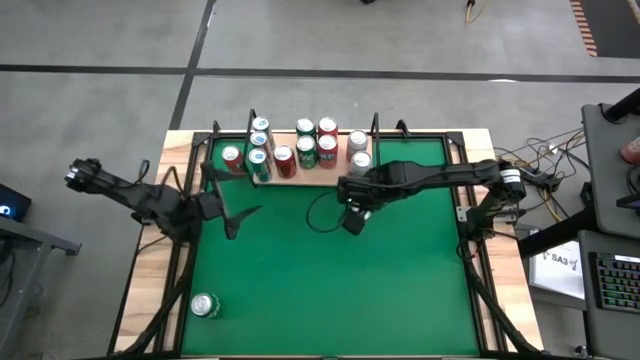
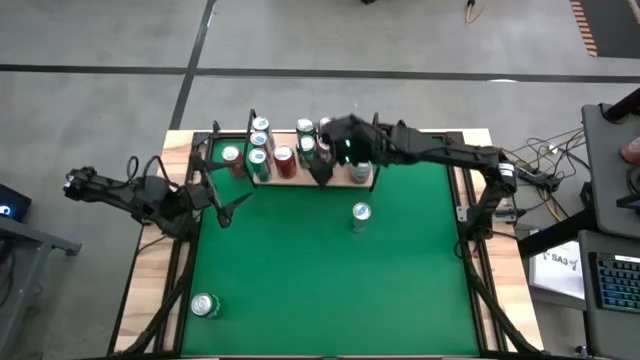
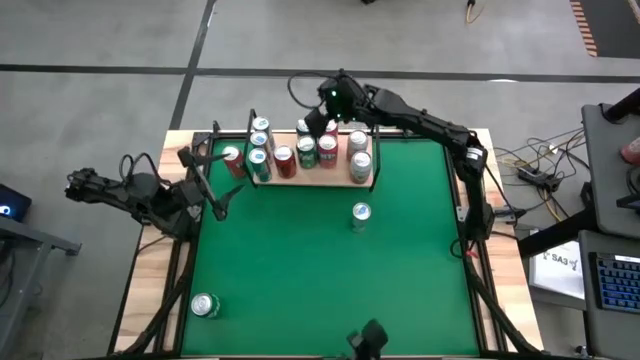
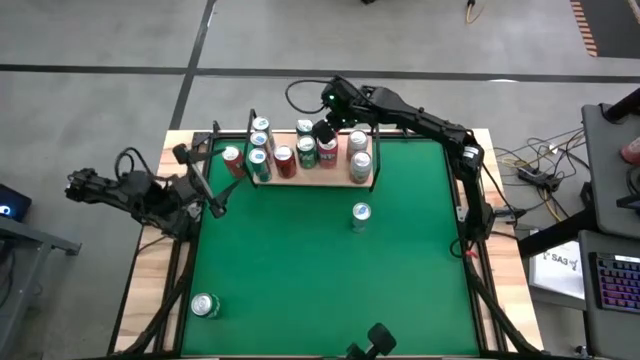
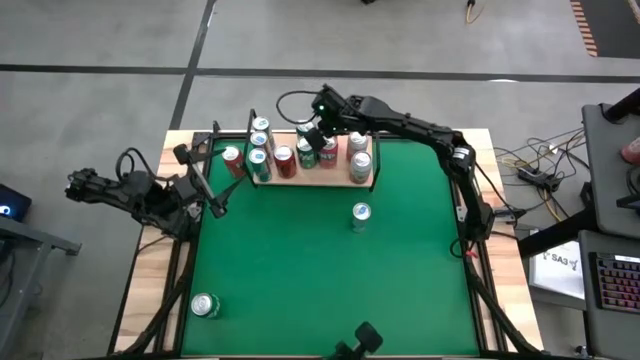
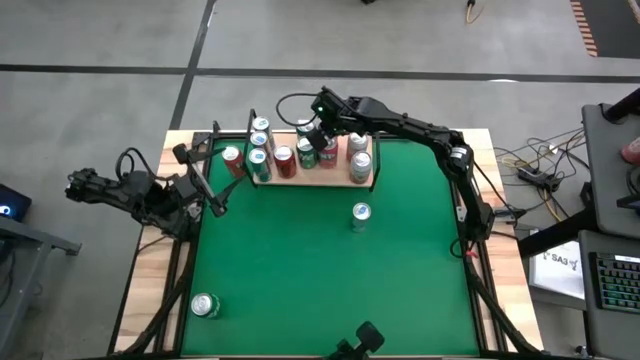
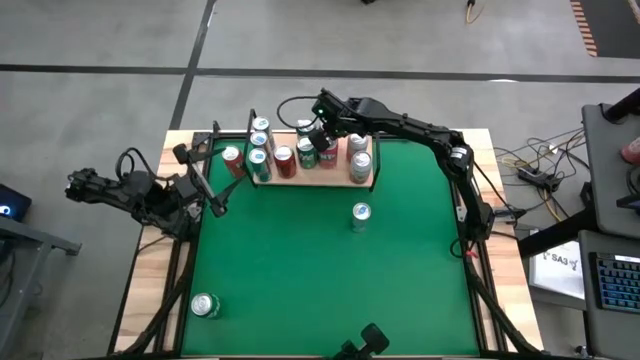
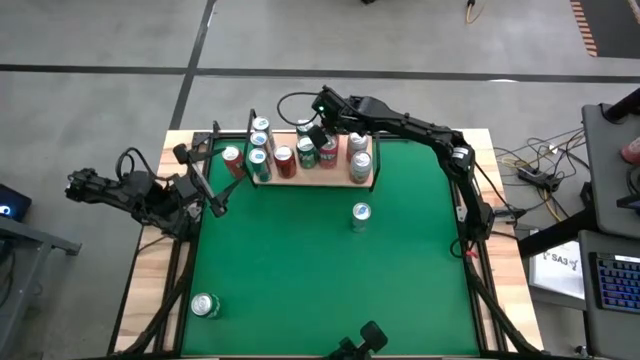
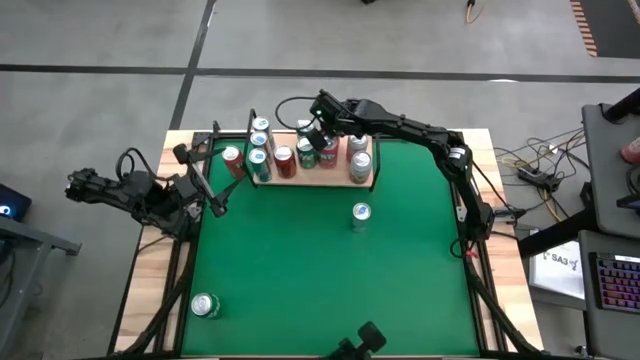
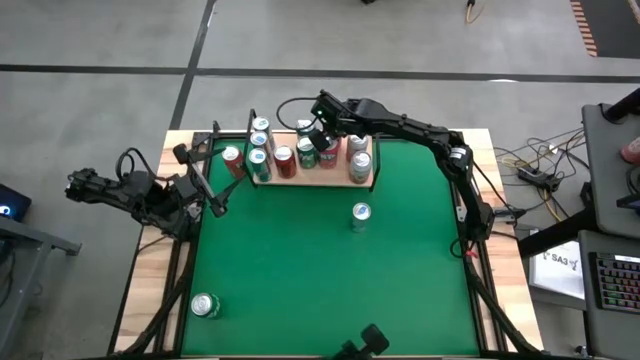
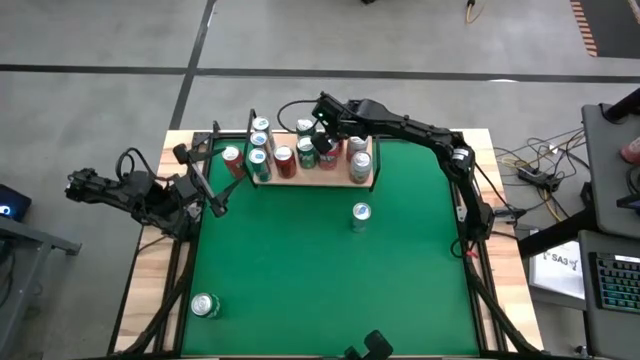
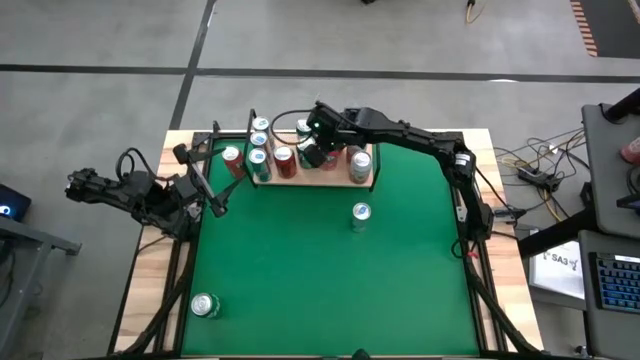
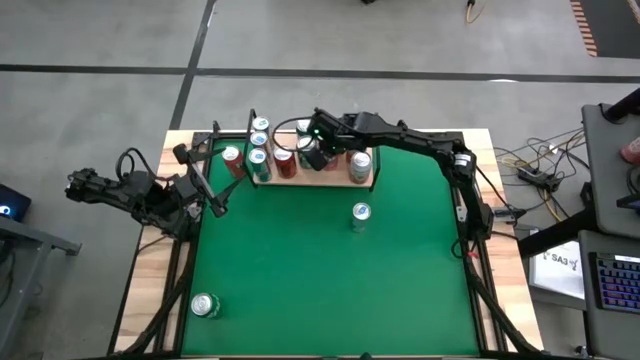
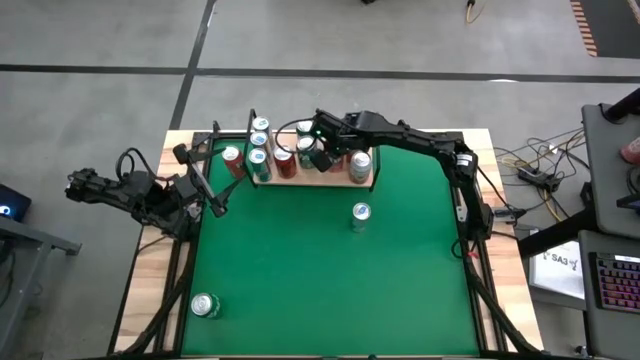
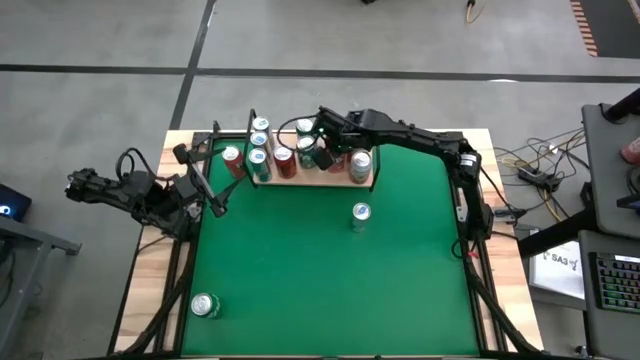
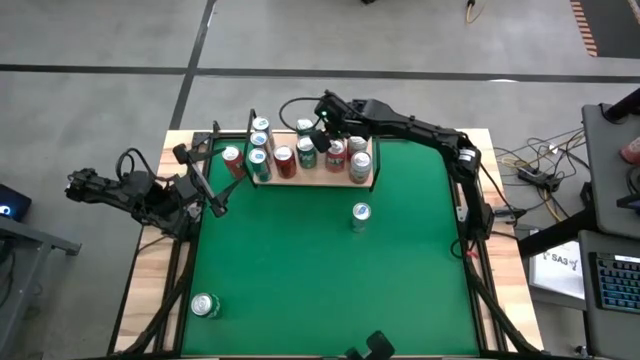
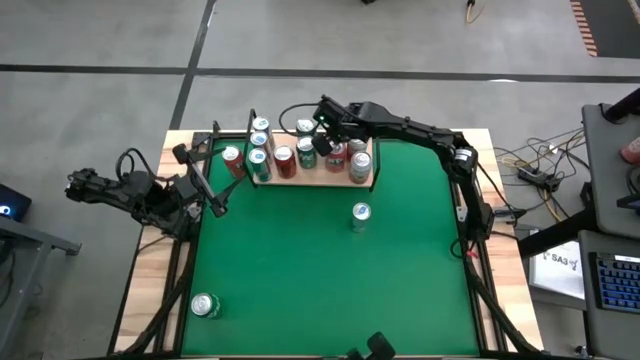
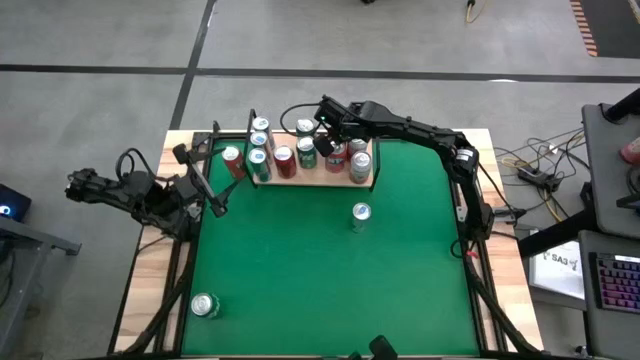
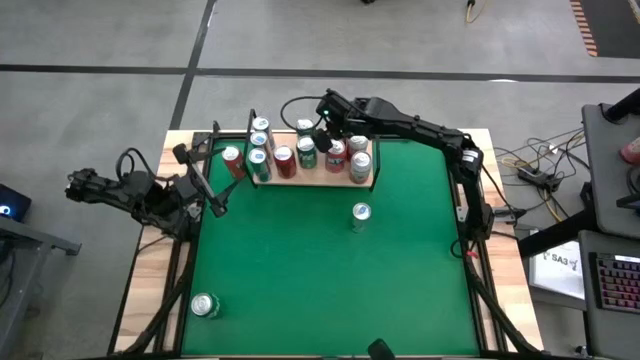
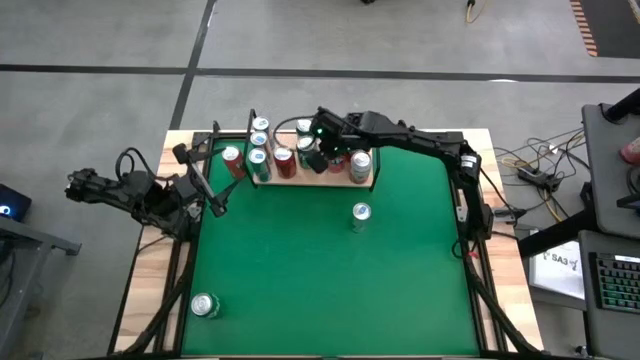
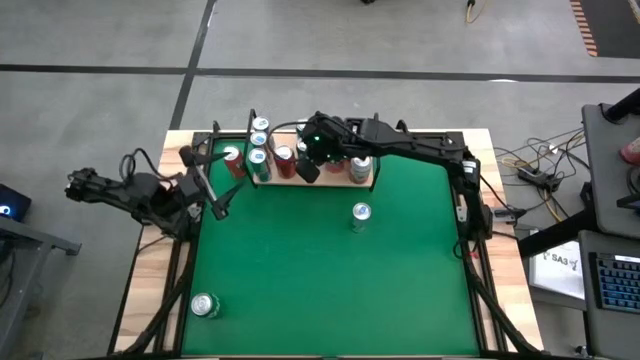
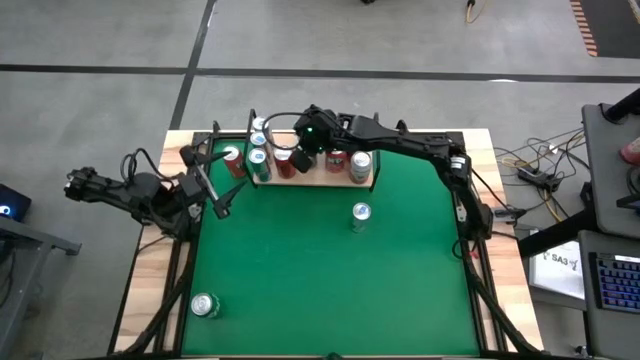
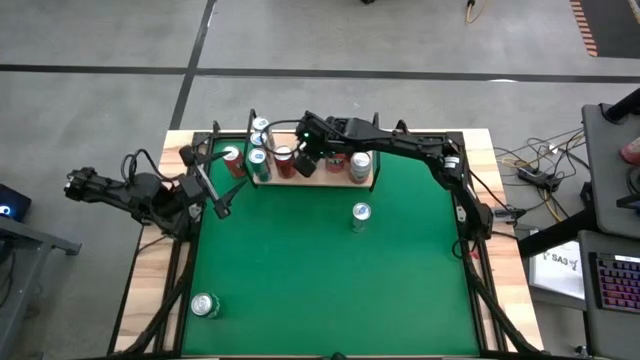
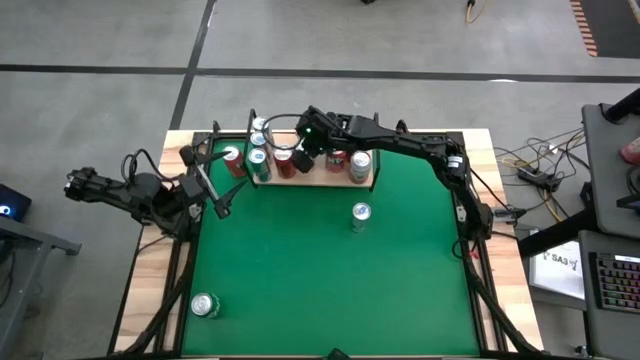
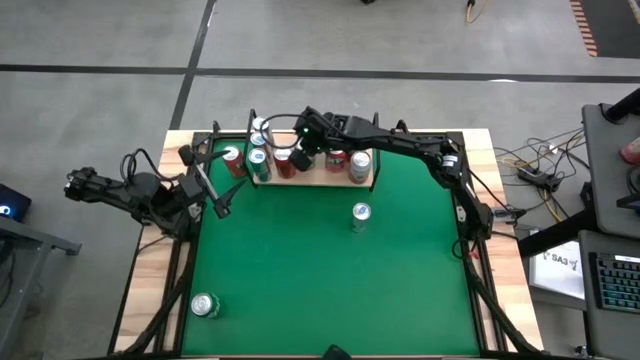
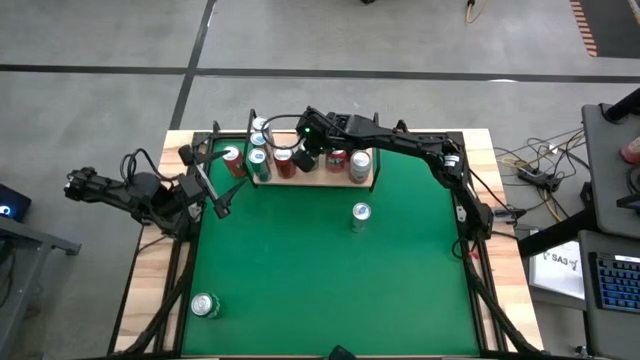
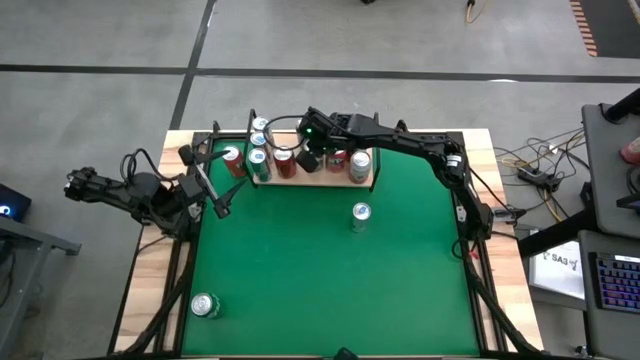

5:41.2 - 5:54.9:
Task: Pick and place cans onto a shelf
Adjust the soda cans on the shelf

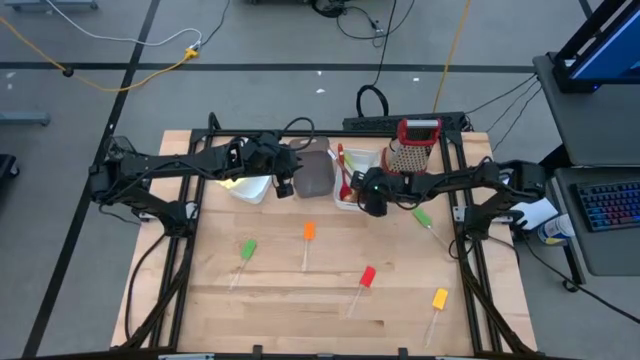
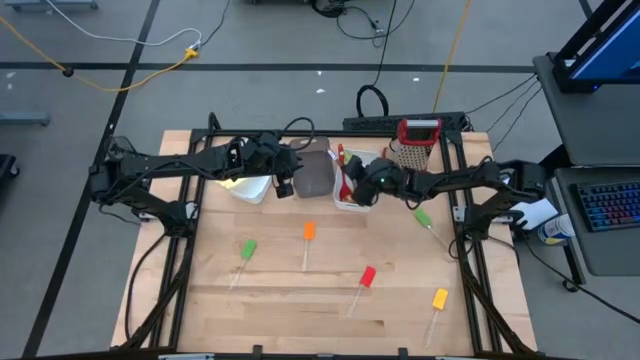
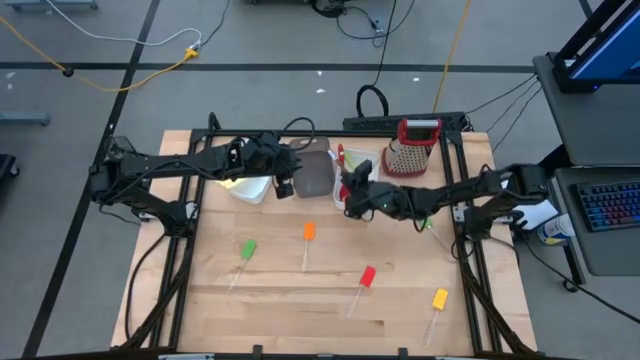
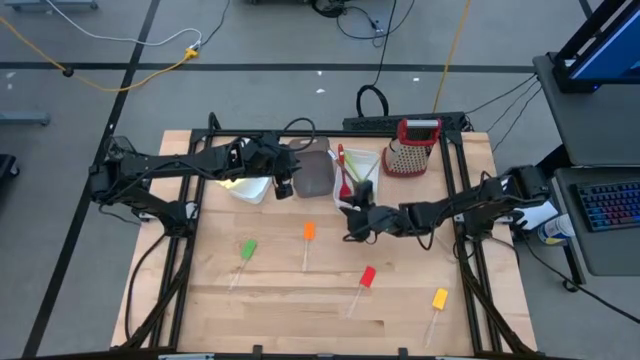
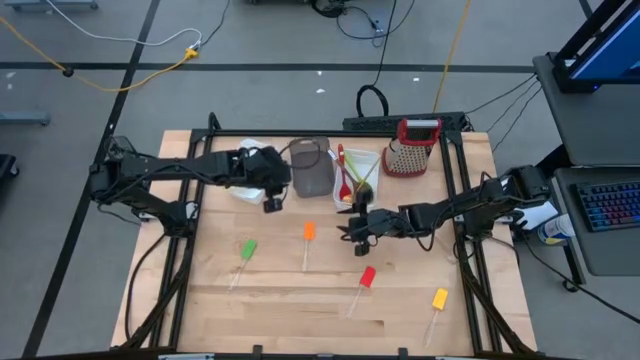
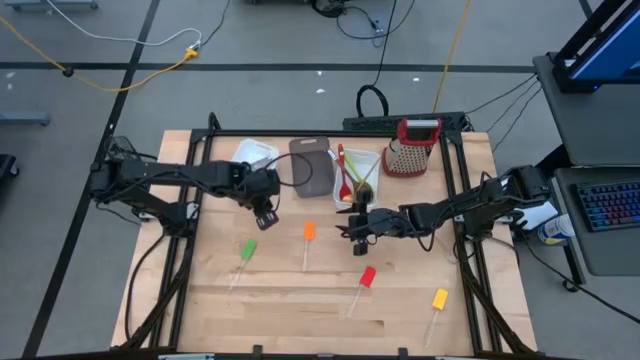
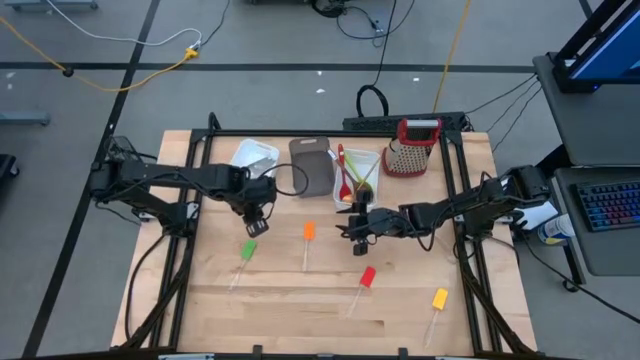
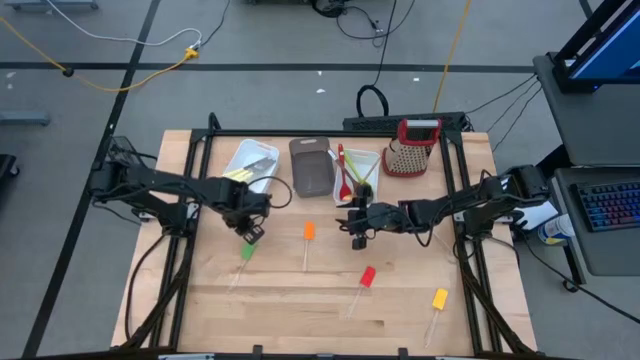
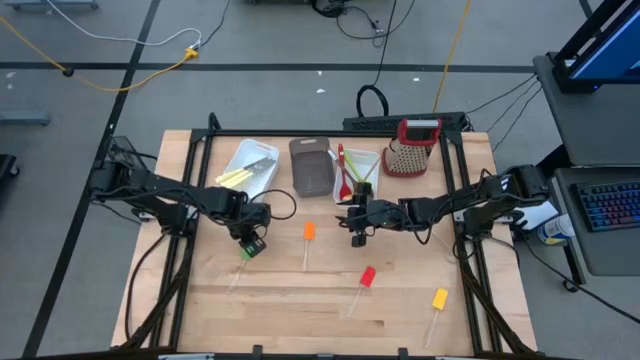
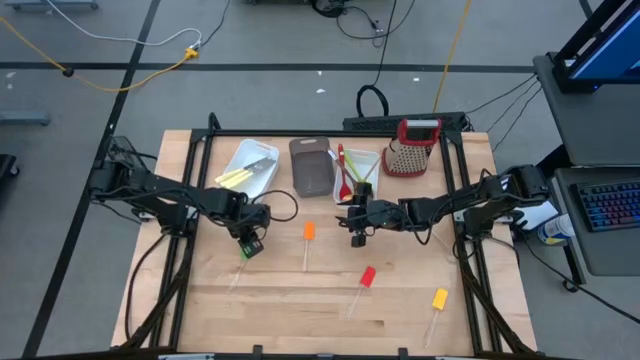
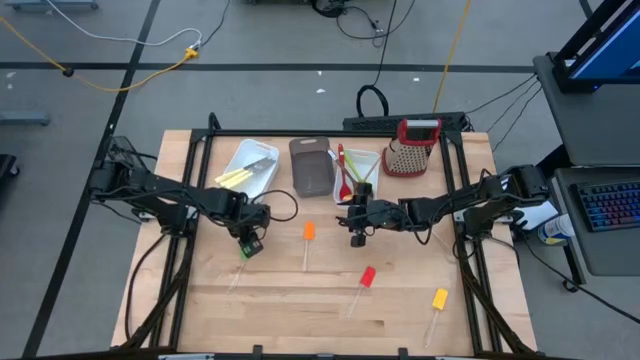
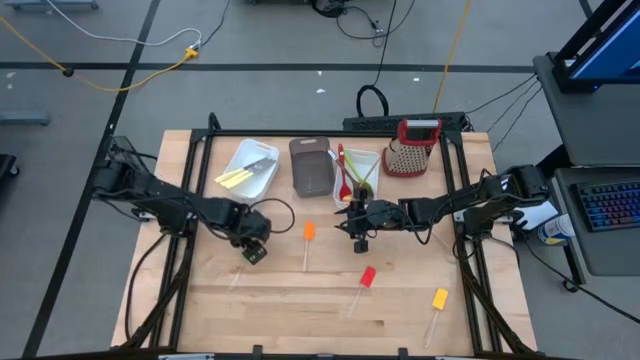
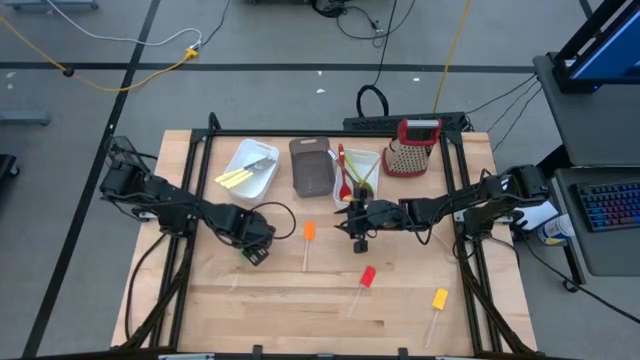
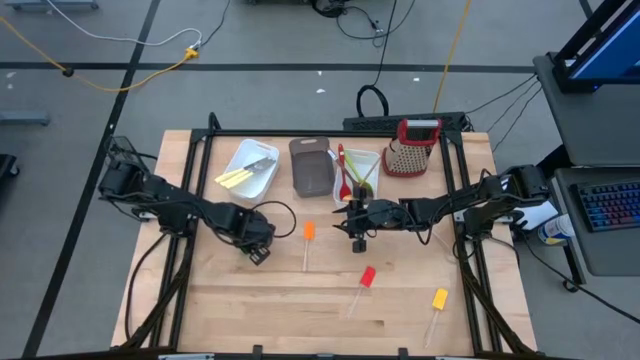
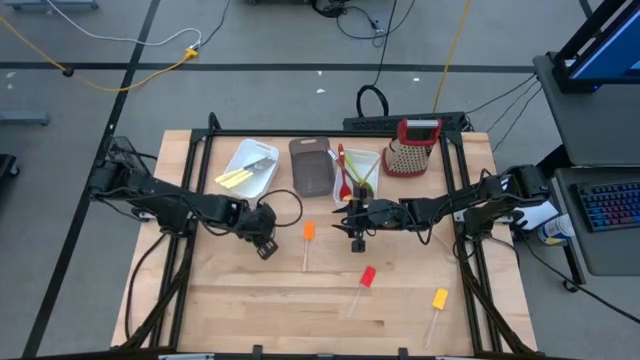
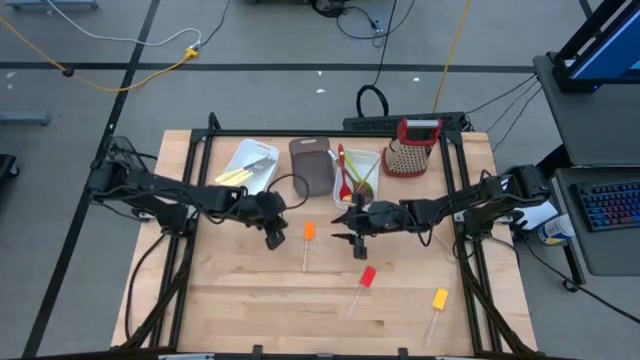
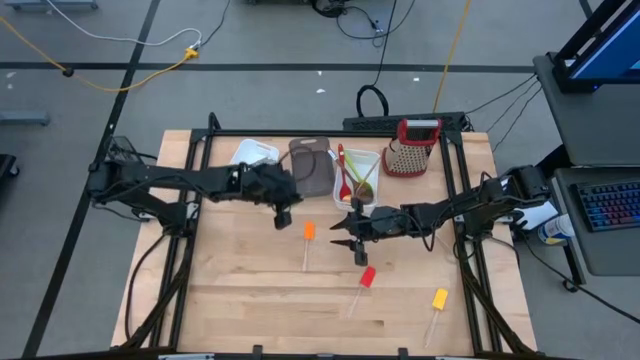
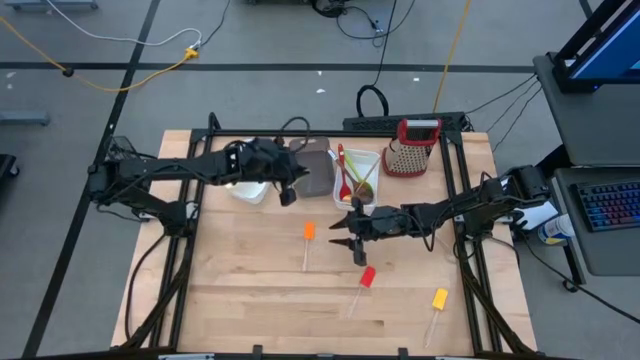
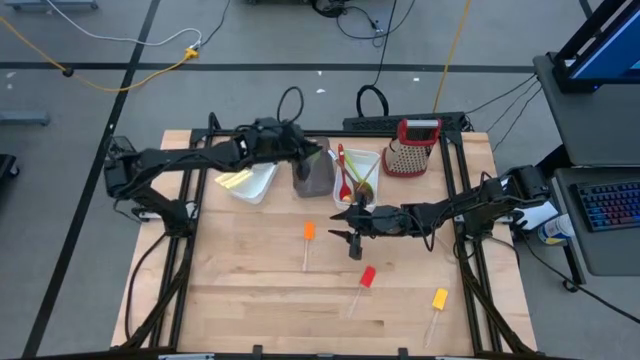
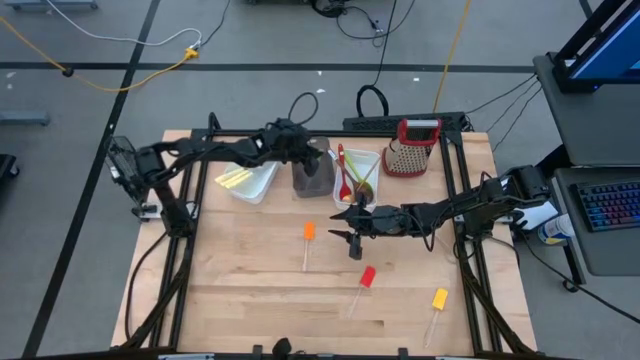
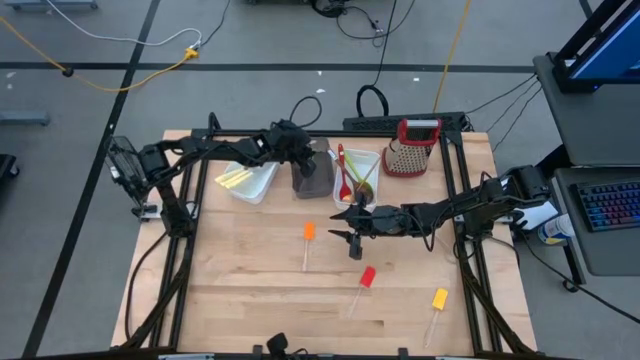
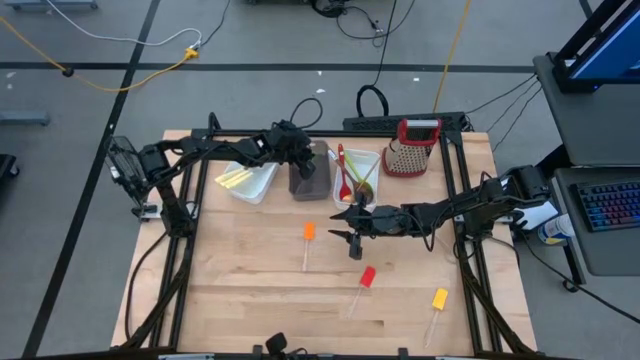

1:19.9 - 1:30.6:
Task: Pick & Place Kitchen Items
Put the left green spatula into the black bin
